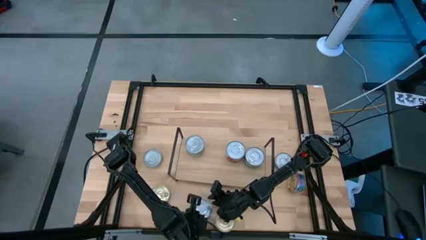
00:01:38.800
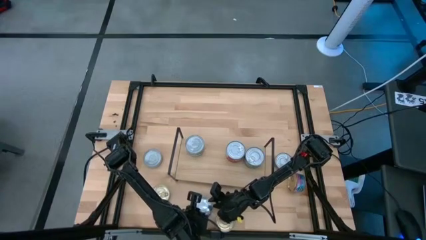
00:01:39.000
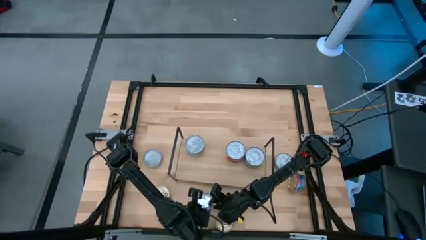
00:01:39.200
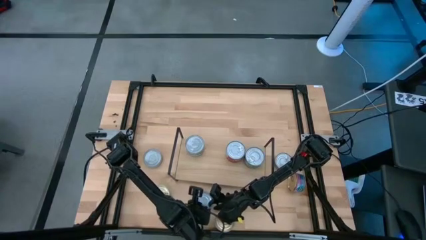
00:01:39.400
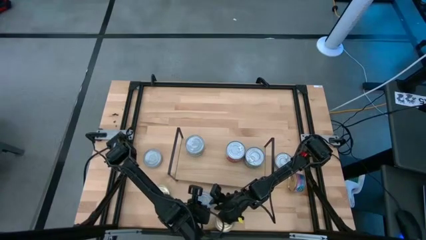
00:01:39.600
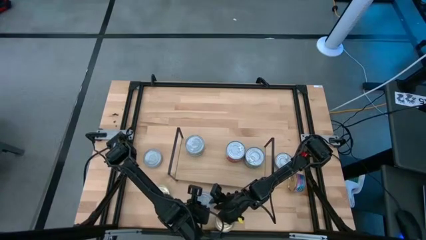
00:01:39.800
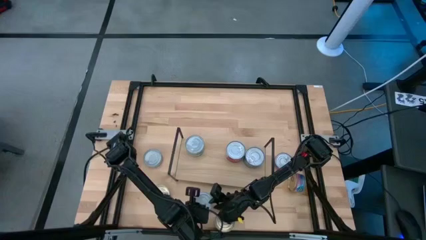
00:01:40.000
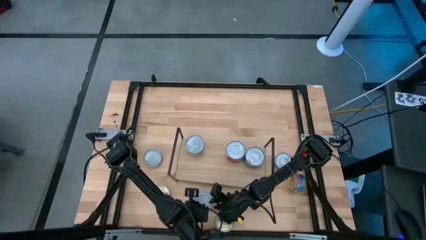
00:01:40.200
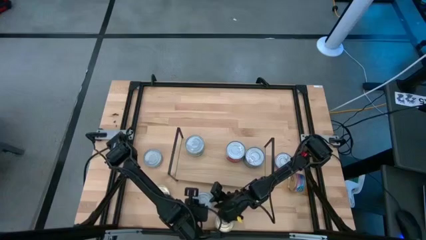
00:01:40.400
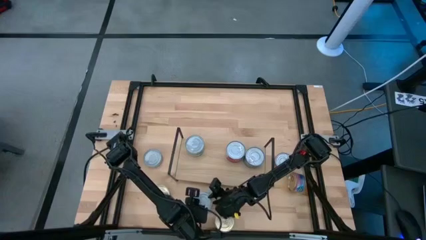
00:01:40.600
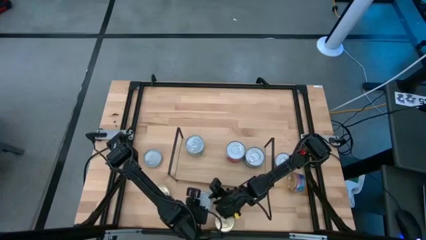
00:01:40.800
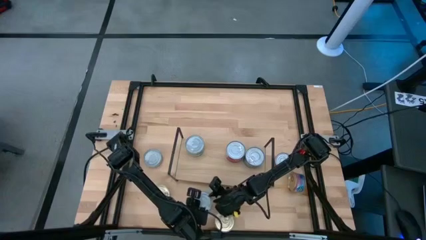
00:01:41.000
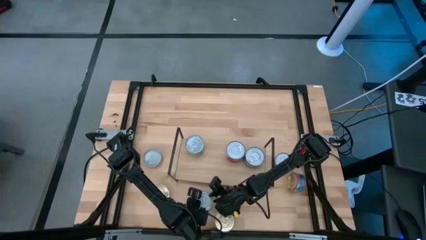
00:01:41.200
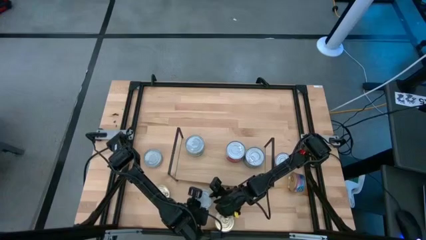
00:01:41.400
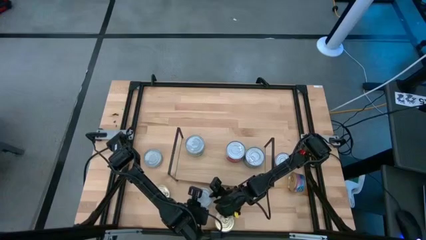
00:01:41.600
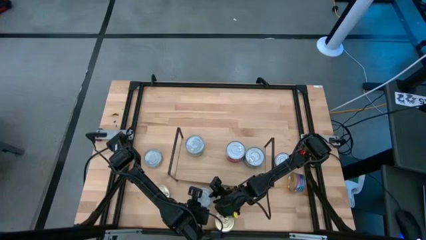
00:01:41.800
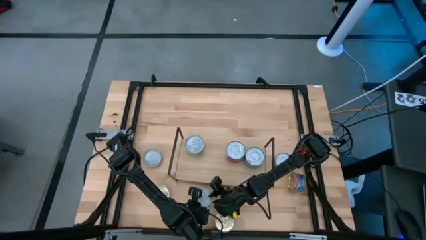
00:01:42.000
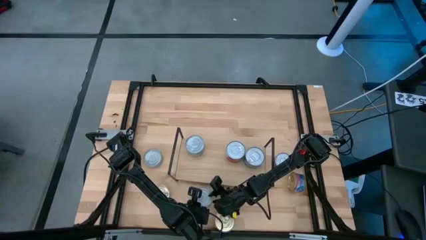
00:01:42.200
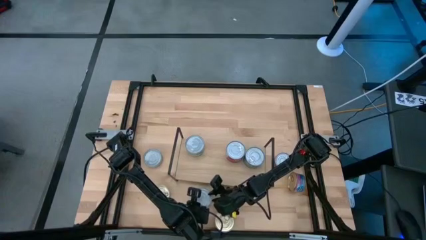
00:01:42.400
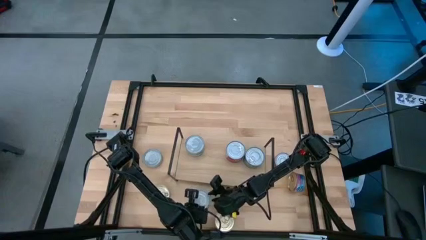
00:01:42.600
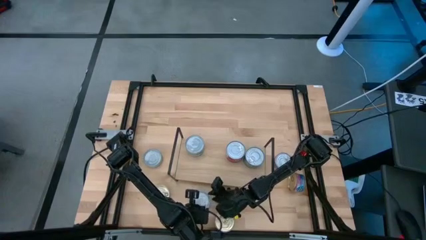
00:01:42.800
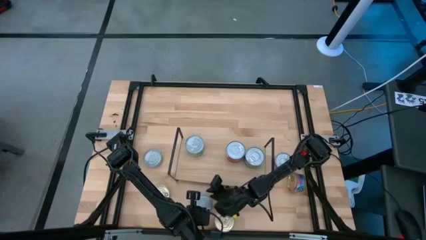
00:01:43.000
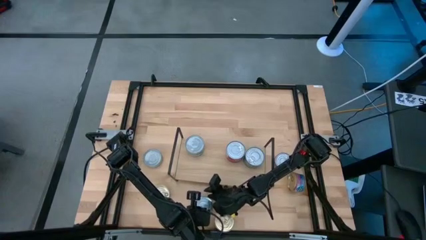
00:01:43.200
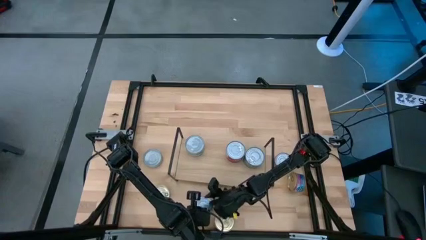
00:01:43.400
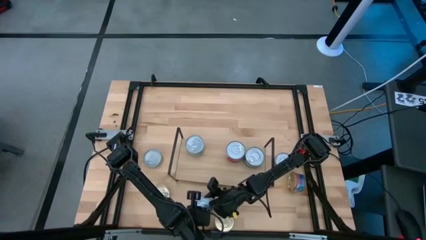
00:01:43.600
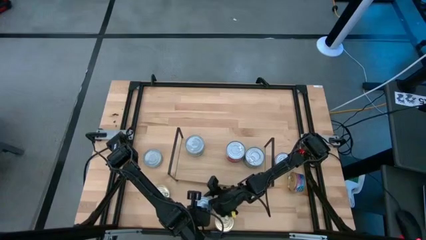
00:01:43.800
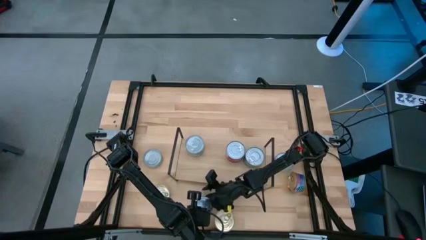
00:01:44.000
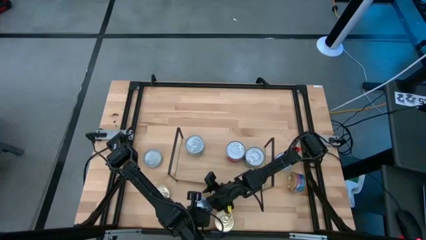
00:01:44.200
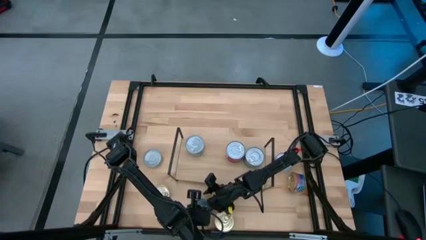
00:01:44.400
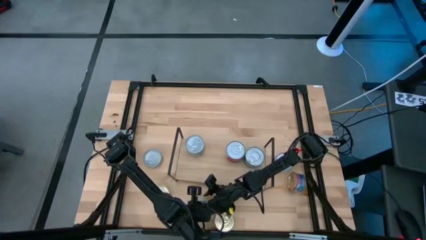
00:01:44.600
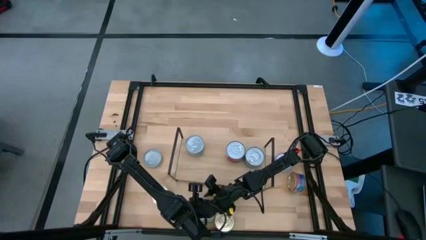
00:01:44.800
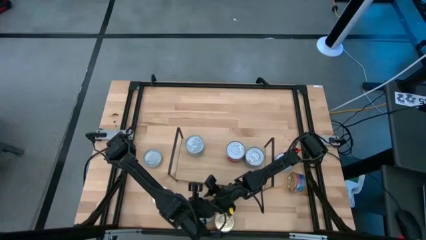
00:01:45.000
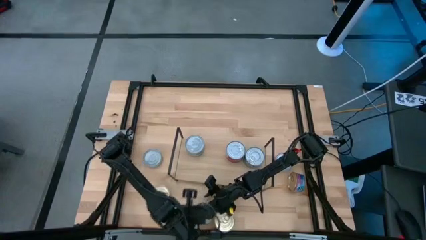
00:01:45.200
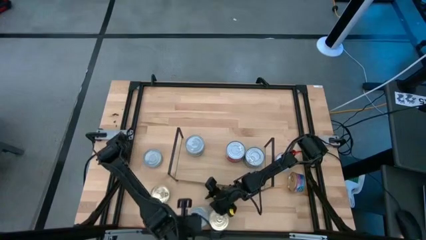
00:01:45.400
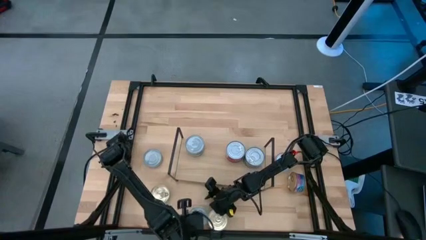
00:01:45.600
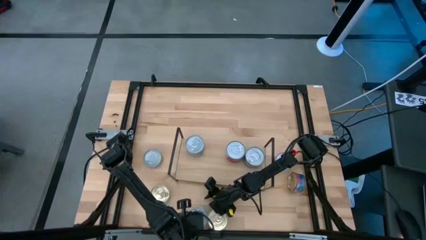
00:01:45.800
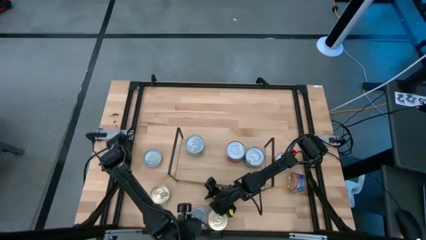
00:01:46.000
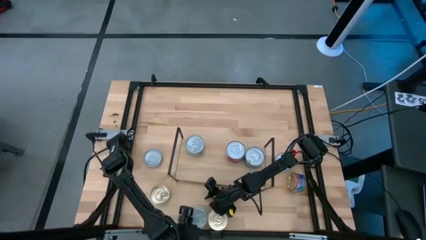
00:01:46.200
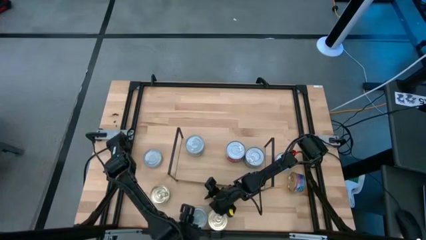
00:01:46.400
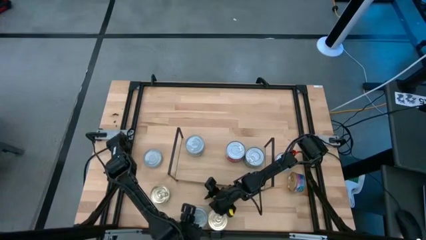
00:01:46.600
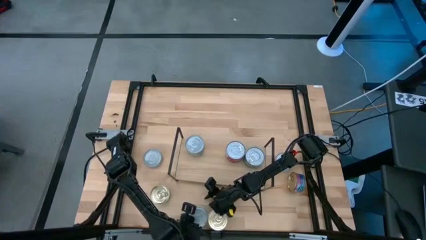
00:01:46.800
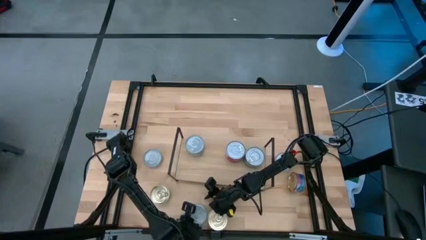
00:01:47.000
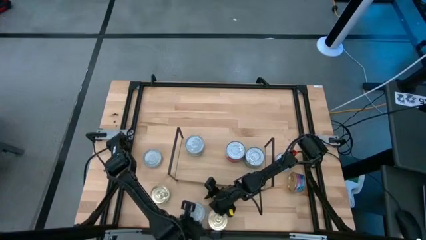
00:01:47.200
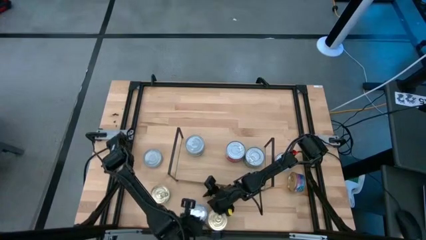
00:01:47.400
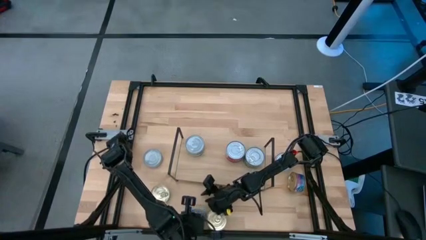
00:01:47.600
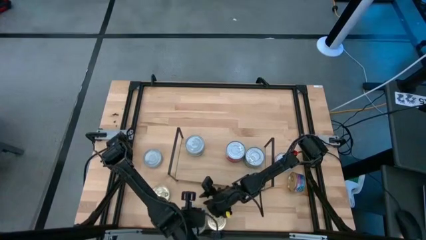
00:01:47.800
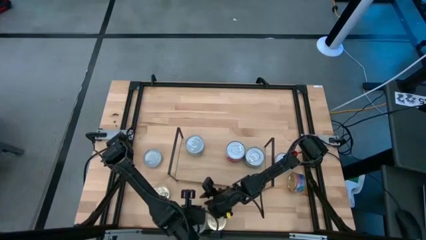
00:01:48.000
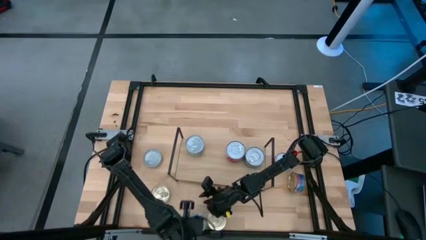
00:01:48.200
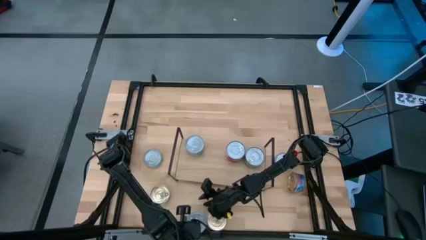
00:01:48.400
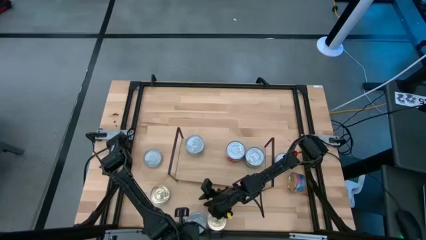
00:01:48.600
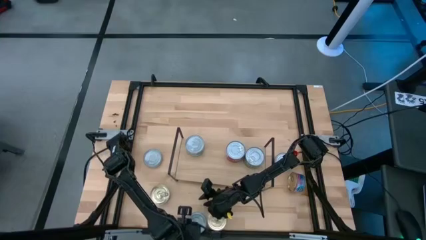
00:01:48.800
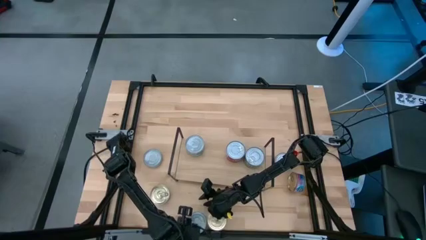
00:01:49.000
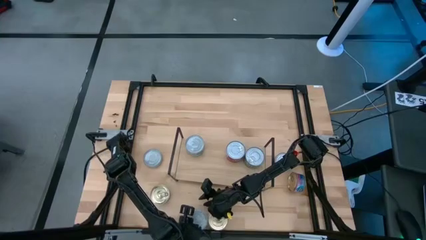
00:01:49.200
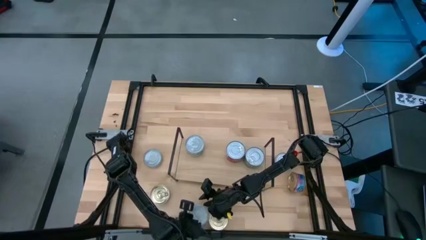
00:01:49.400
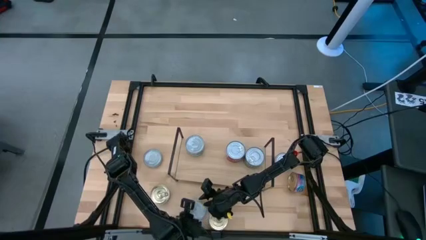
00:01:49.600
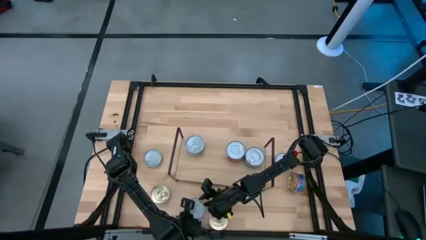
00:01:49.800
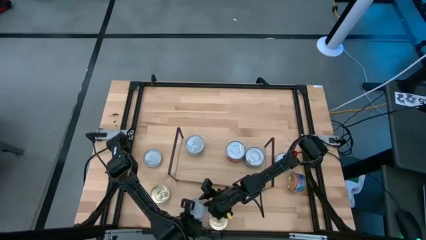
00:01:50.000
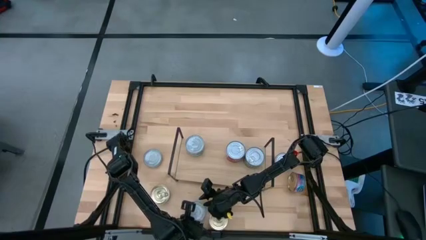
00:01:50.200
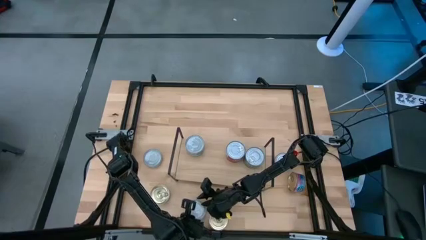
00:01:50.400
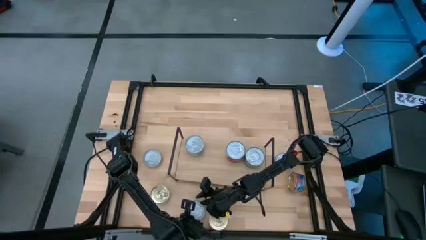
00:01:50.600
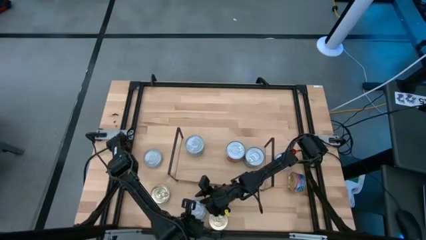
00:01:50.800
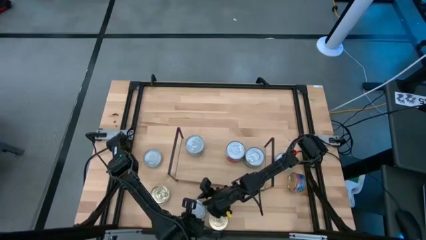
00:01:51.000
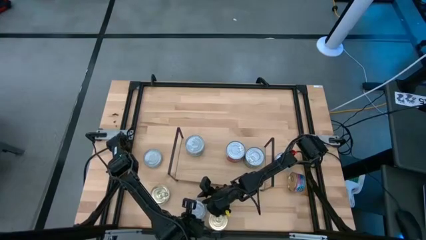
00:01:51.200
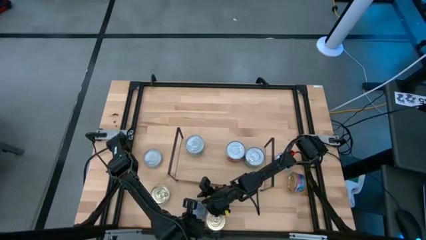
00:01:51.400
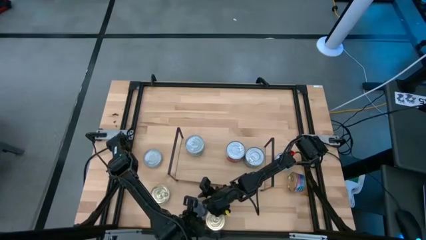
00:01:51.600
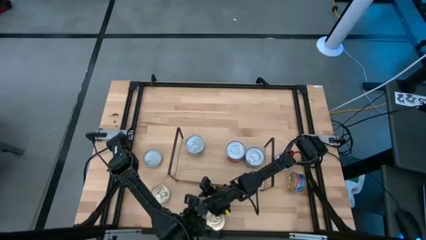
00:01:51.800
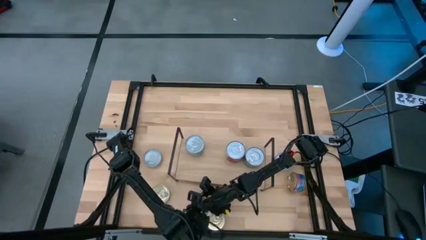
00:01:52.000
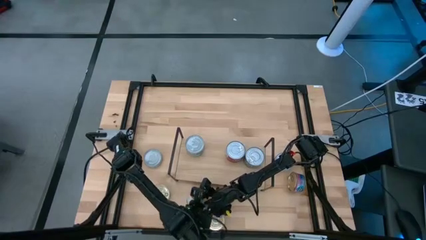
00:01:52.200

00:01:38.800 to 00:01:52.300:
Task: Stack canned seafood by type on shelf
Stack the green white tuna can on top of the green white tuna cans on the shelf

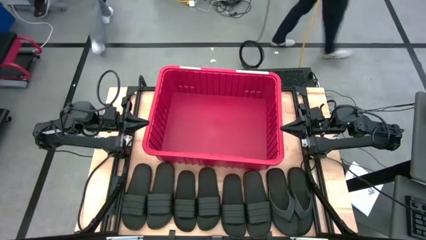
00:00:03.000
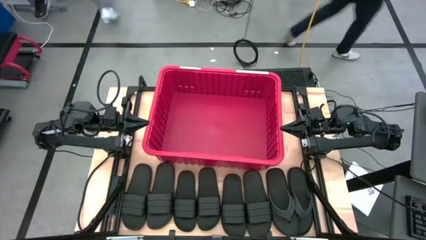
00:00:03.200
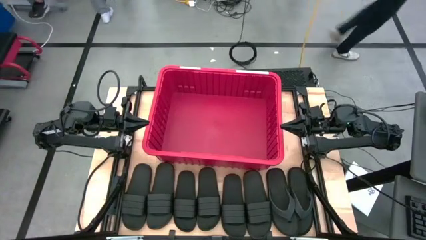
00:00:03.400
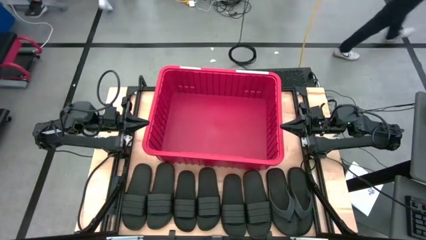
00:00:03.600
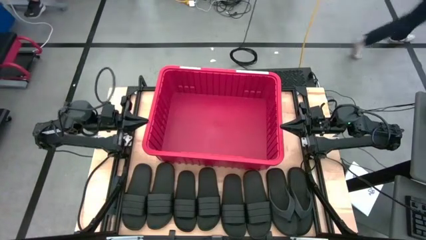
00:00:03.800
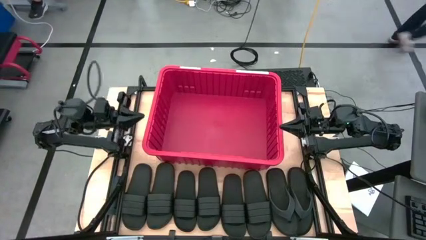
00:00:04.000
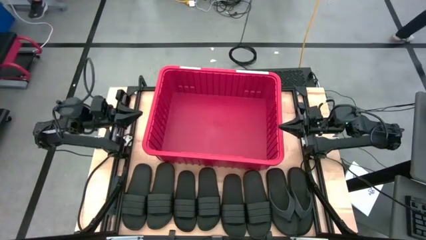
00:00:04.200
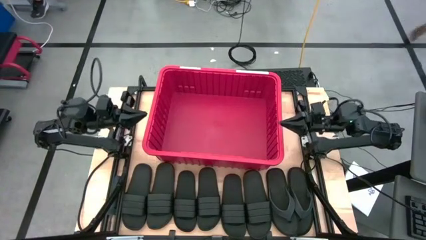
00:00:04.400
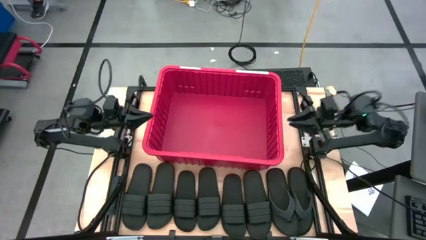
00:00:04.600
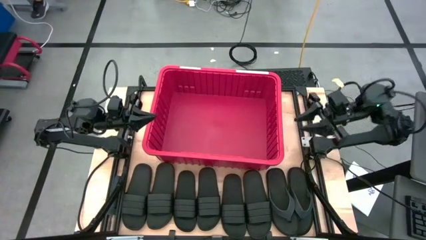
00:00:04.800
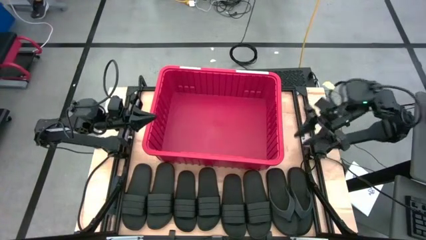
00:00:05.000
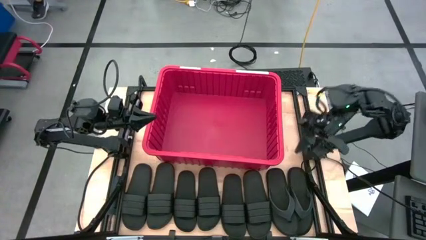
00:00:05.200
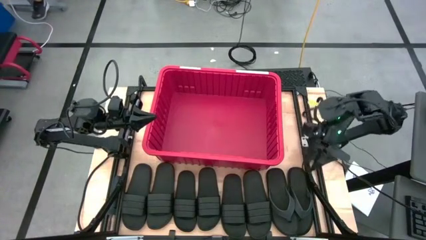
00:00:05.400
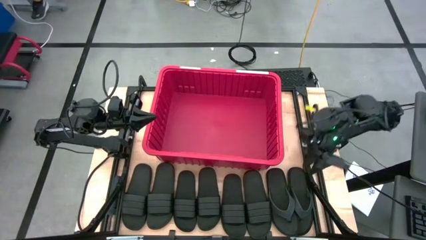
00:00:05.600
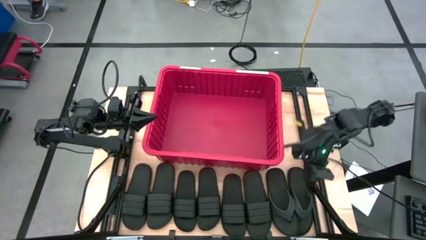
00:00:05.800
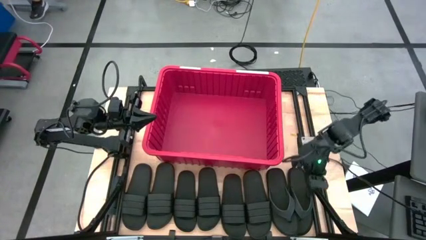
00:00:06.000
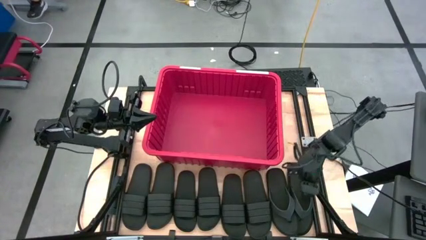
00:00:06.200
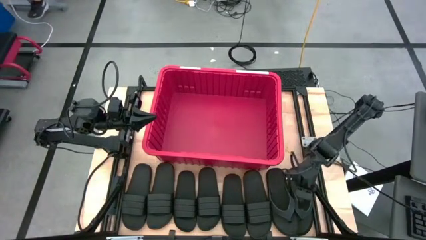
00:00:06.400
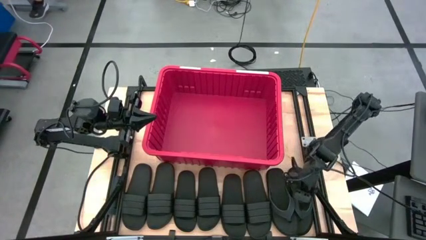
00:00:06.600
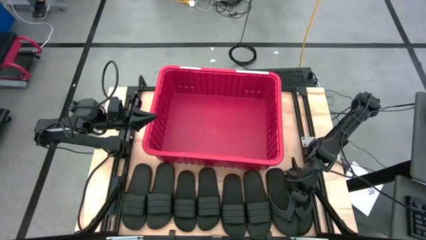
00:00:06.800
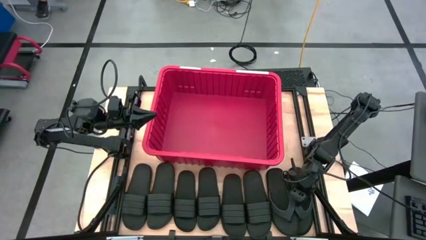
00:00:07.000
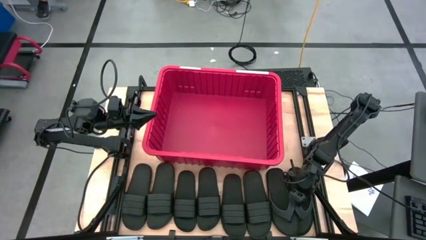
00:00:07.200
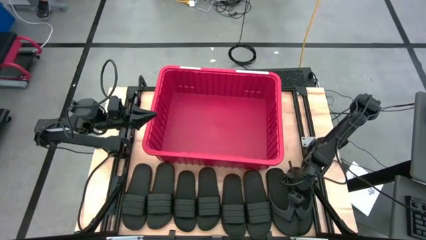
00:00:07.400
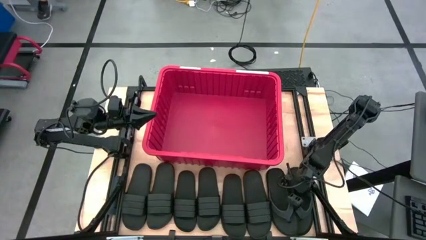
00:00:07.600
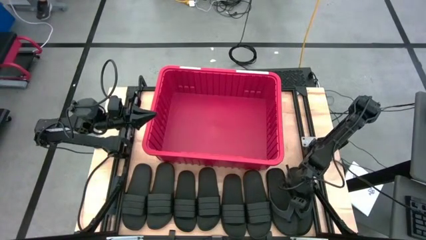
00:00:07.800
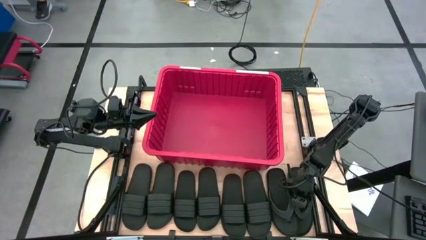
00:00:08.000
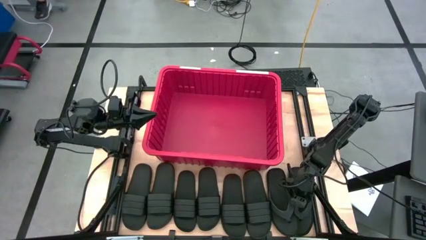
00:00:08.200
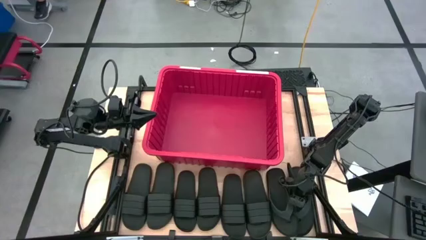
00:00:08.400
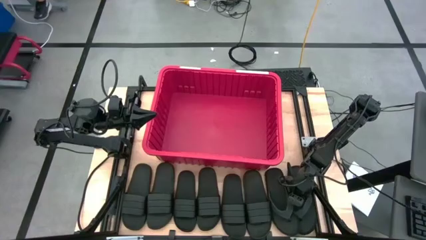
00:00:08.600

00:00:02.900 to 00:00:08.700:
Task: Pick and place slides into bin
Put the black slipper into the red bin
